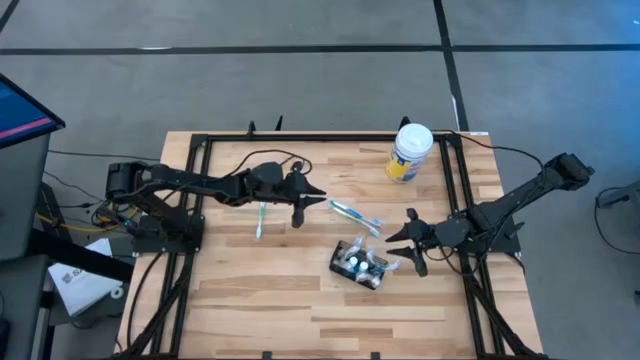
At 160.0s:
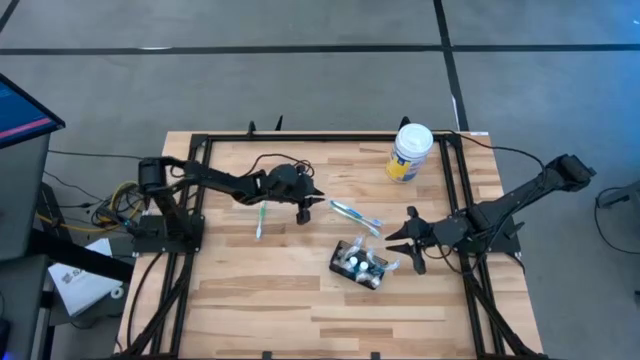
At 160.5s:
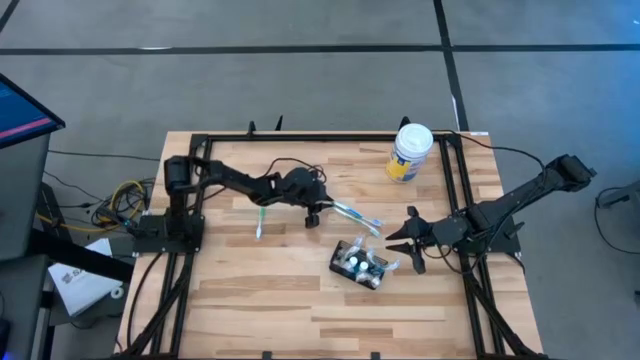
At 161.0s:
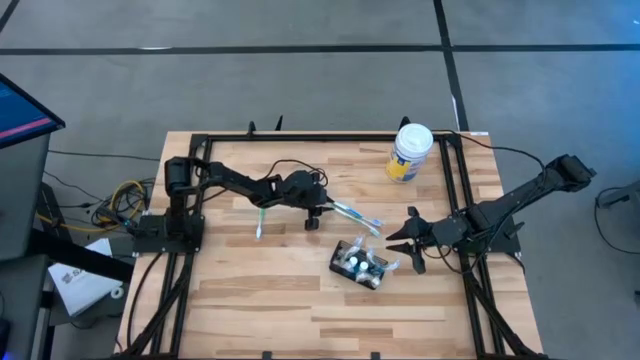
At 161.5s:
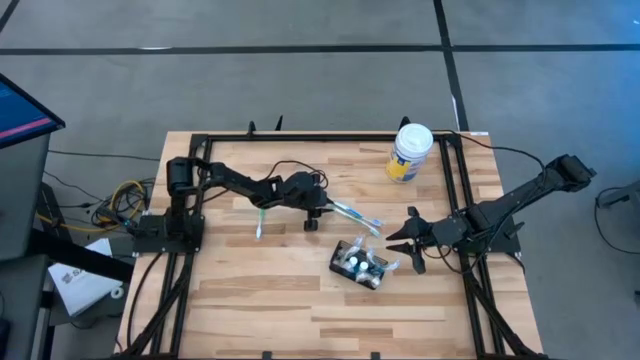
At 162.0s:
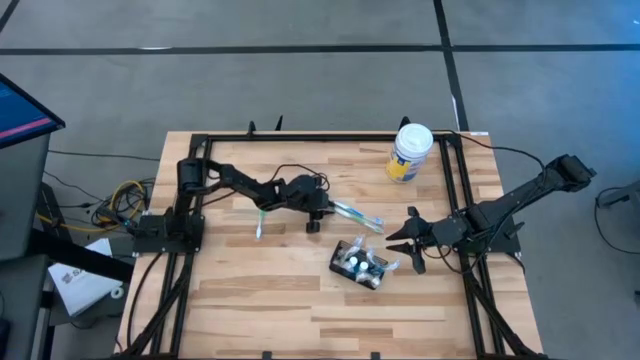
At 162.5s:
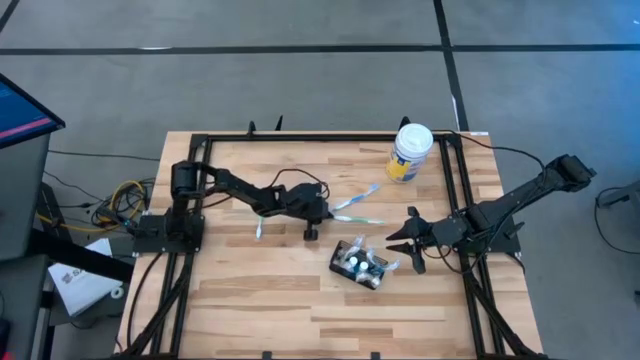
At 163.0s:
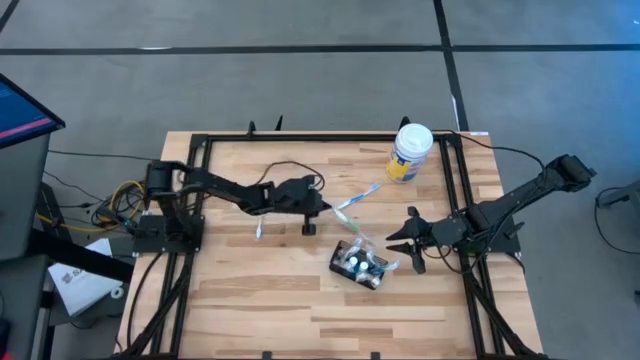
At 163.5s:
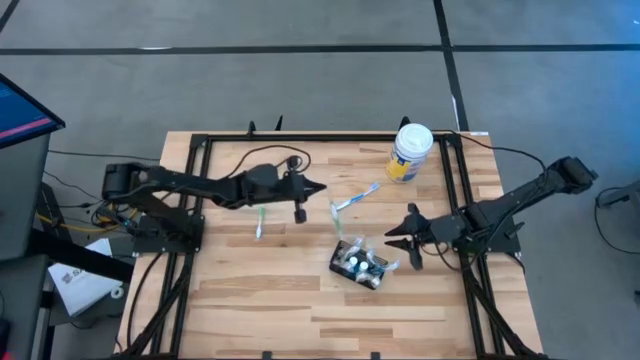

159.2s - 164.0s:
Task: Pick & Place toothbrushing station
Put the right green toothbrush into the mesh organizer

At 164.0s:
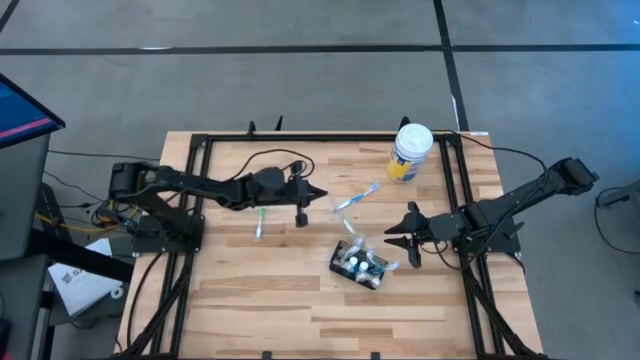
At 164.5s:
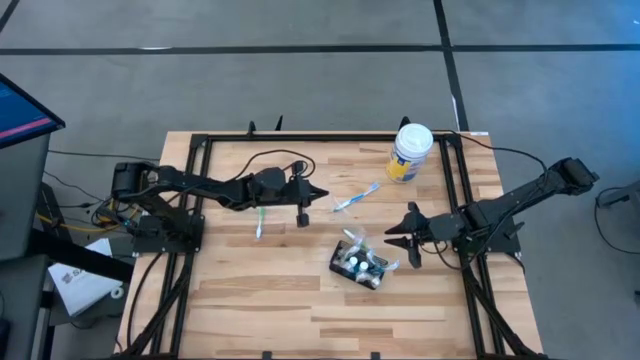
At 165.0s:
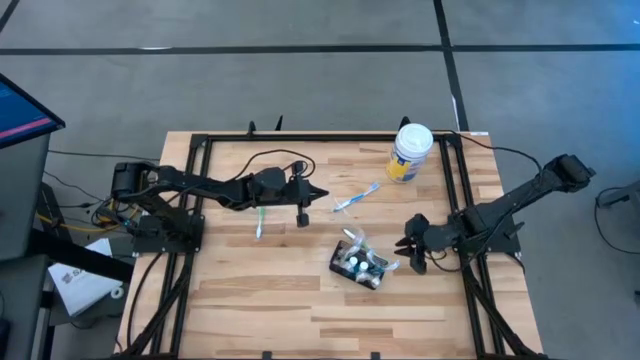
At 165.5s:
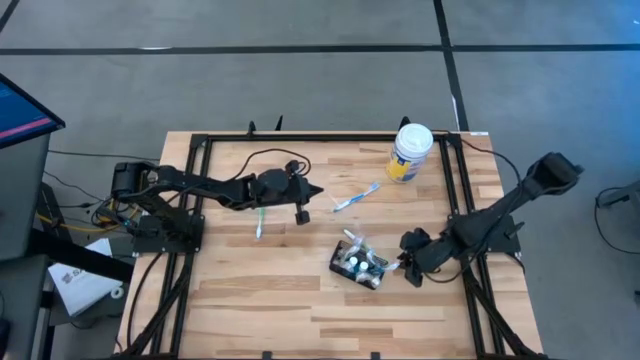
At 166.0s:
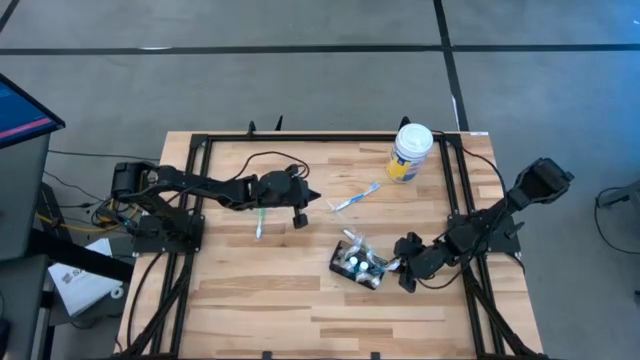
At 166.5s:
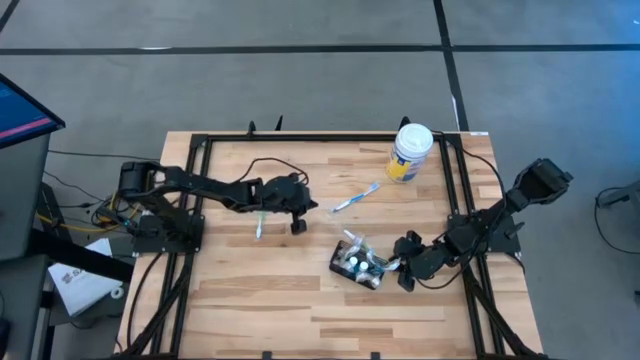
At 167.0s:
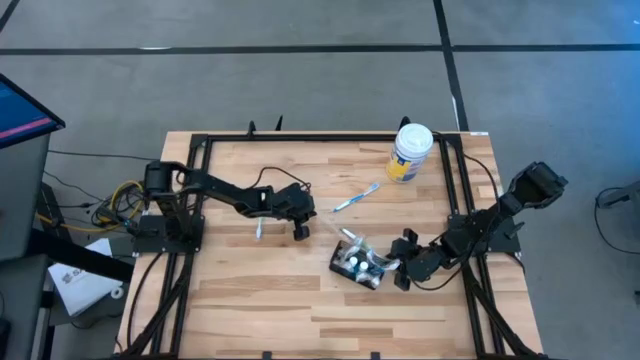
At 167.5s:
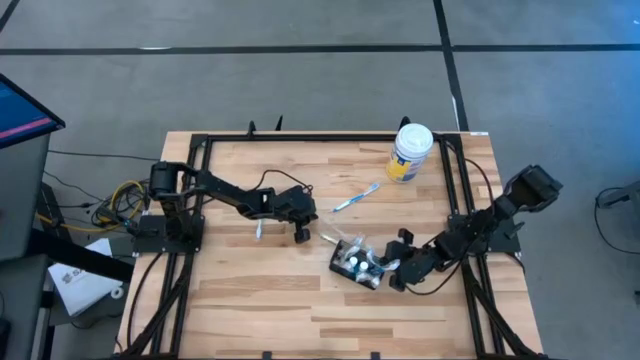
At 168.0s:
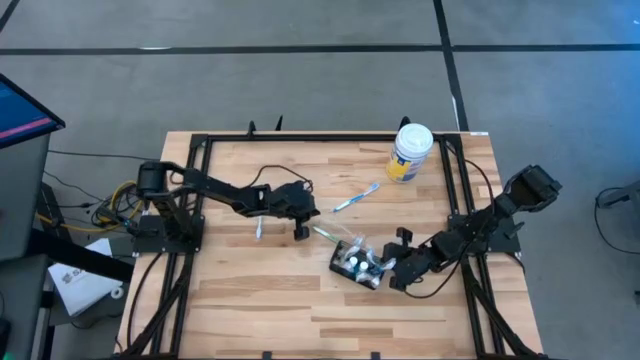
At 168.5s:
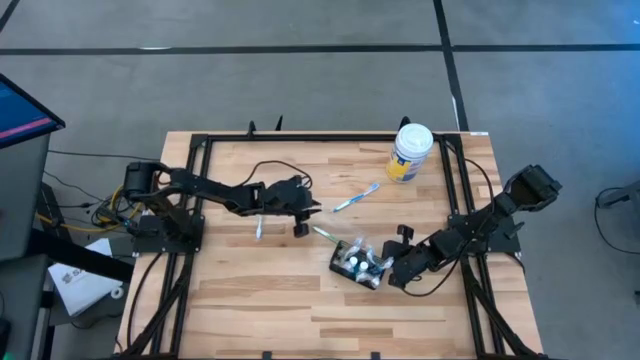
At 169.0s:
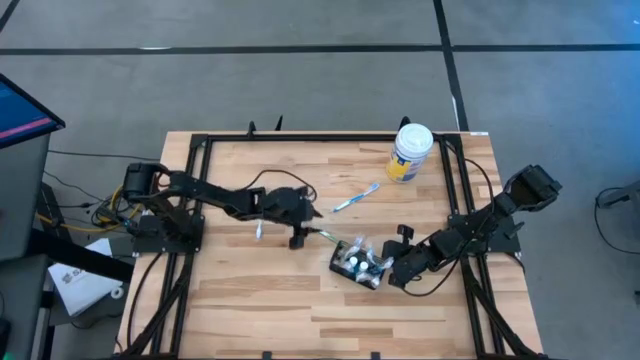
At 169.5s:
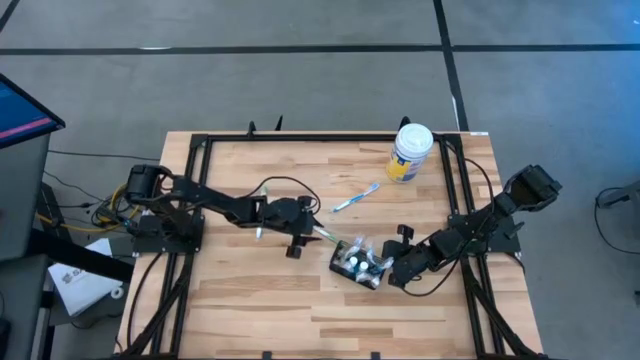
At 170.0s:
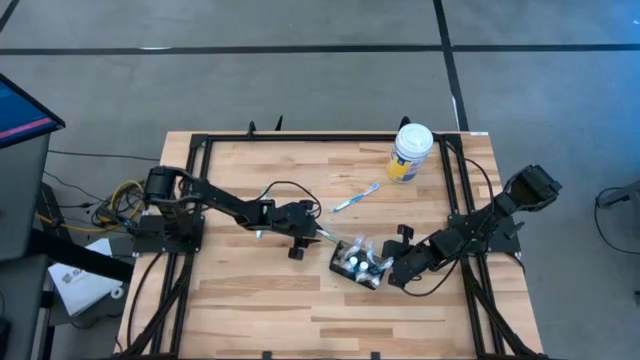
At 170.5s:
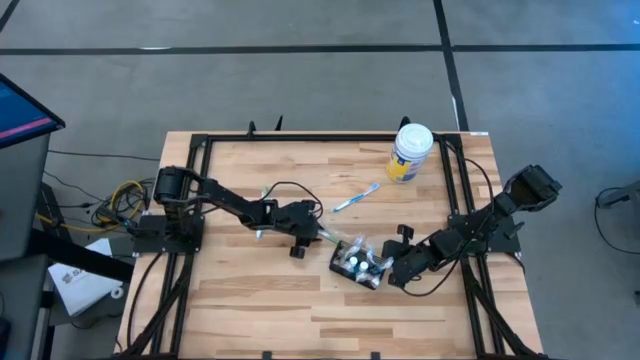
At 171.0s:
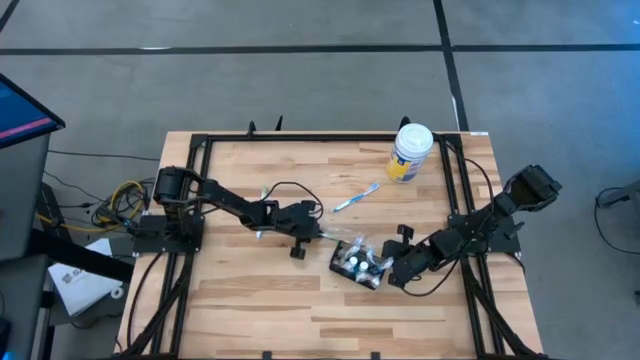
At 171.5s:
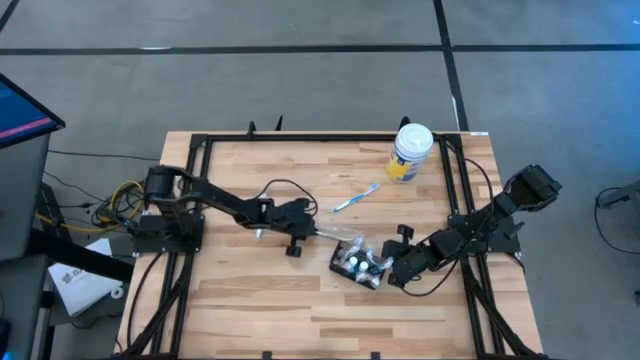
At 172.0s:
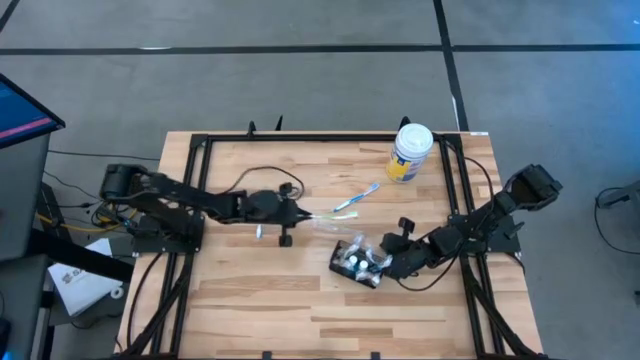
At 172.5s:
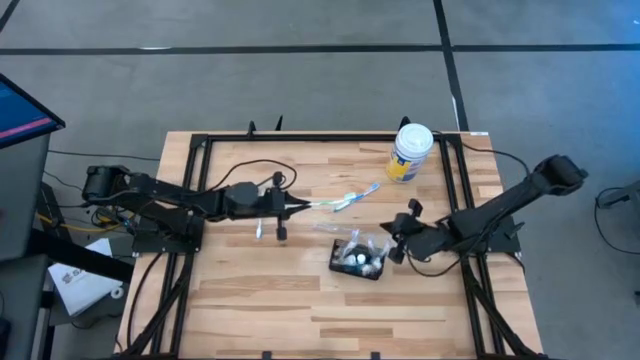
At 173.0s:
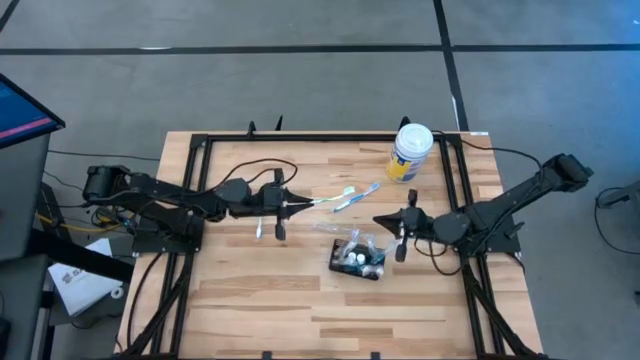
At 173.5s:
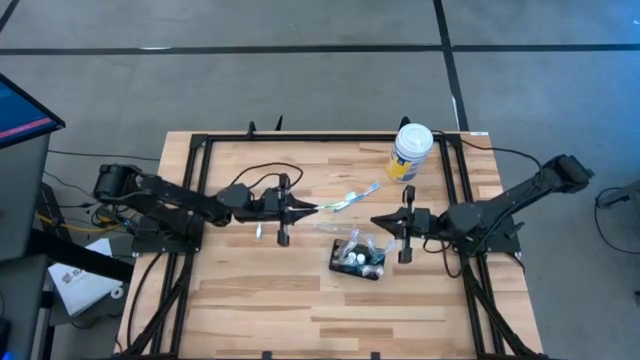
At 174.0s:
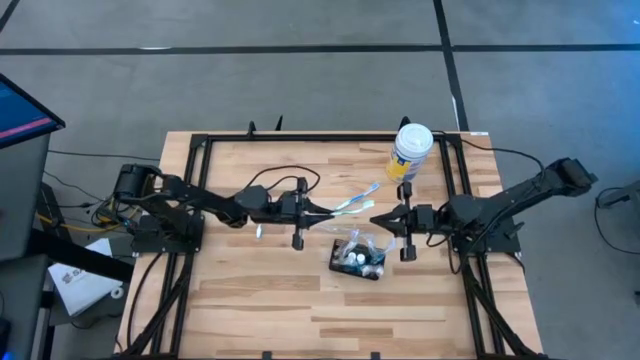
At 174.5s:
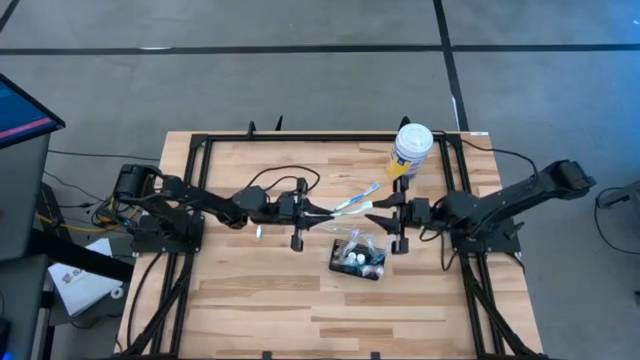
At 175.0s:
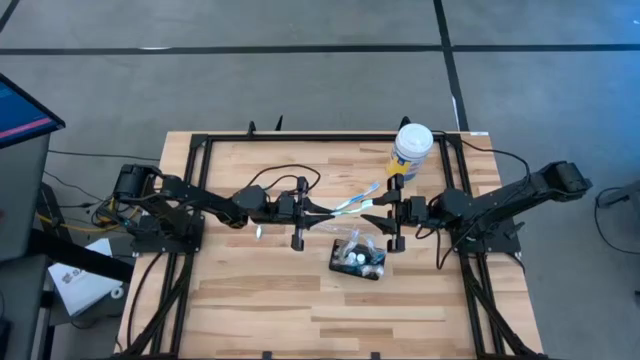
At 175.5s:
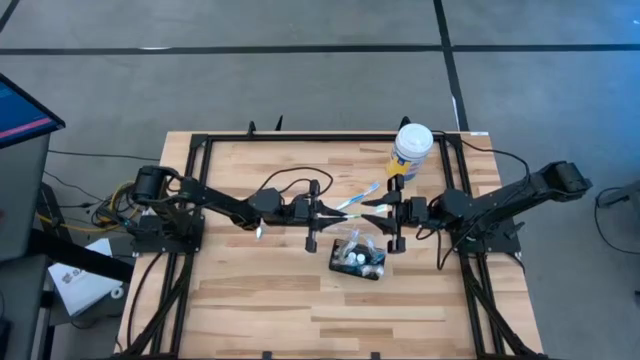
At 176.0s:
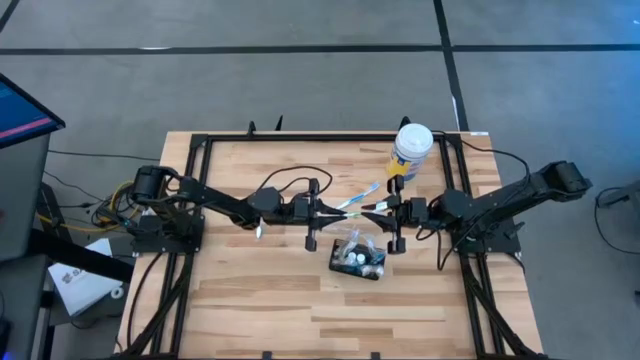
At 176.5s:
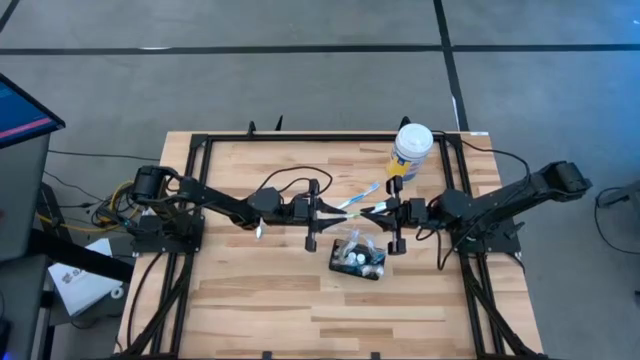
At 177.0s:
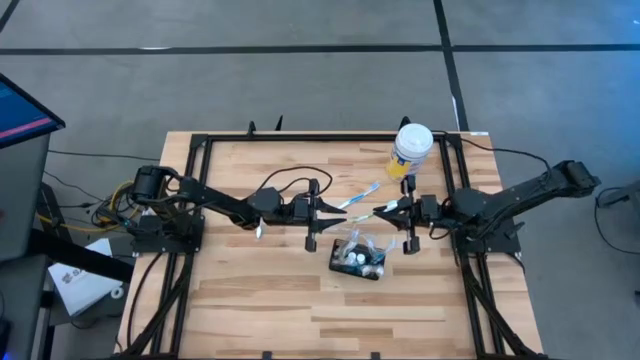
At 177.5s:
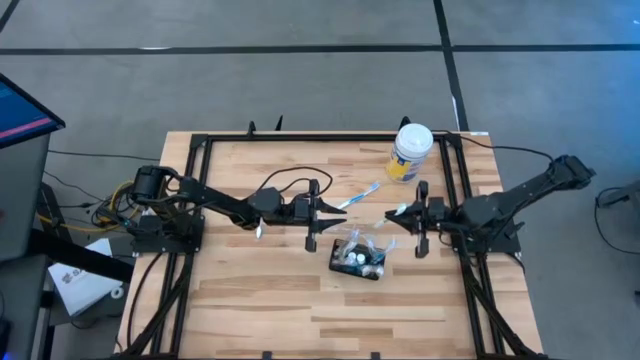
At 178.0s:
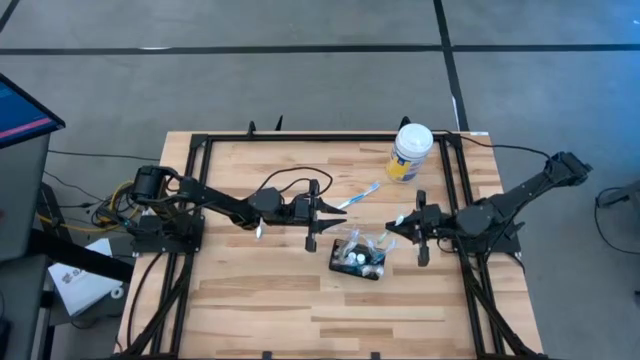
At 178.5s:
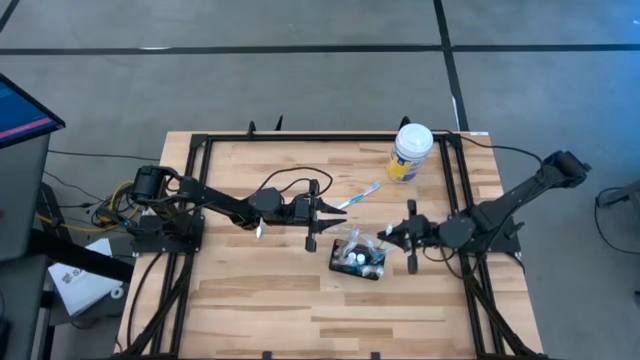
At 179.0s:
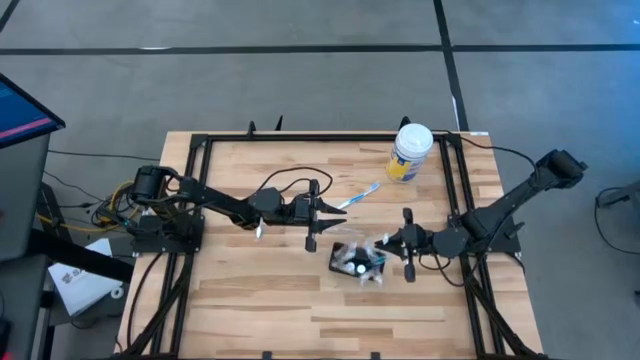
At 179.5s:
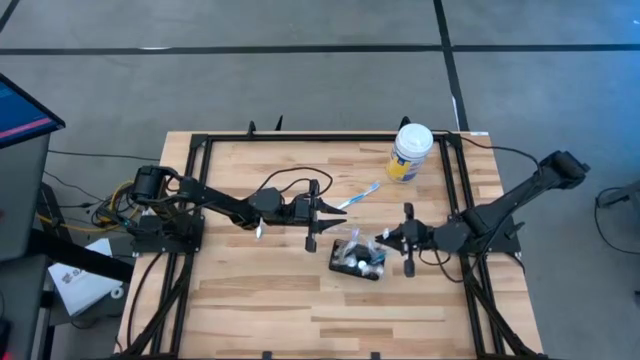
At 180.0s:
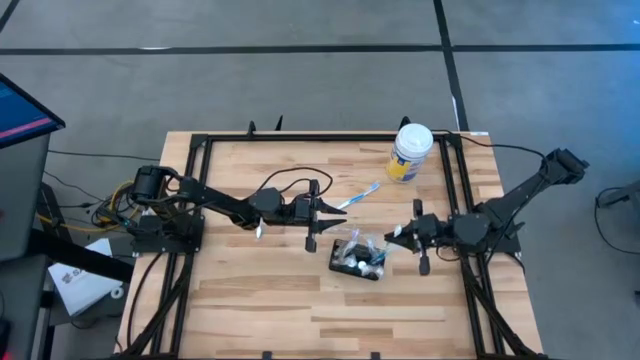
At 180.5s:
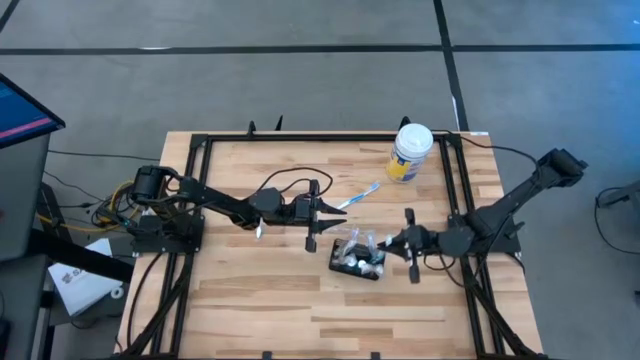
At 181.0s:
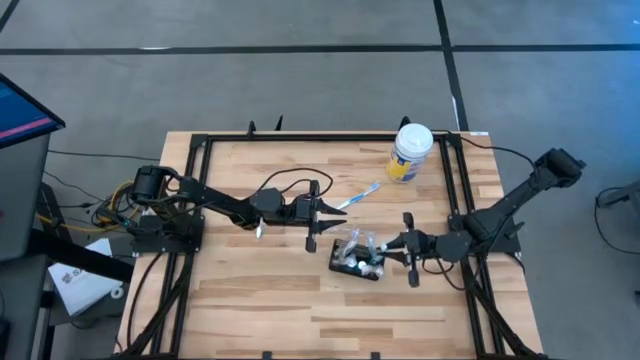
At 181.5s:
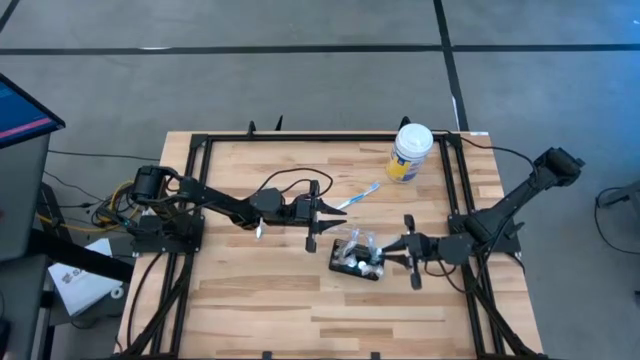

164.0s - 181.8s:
Put the right green toothbrush into the mesh organizer
